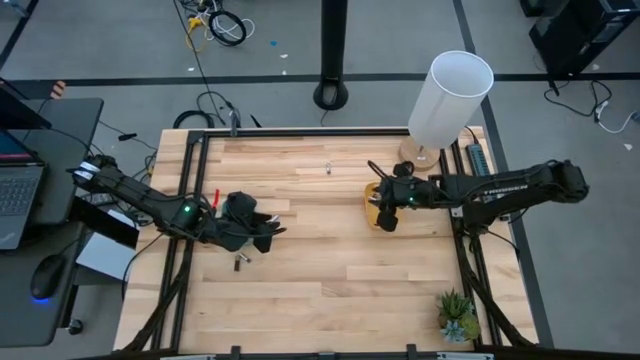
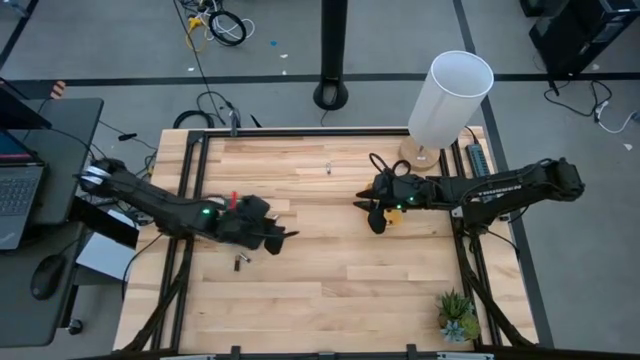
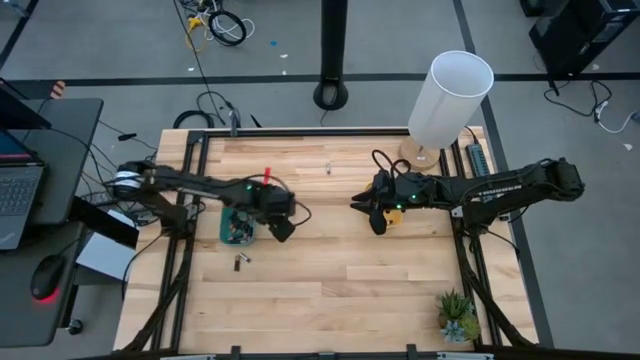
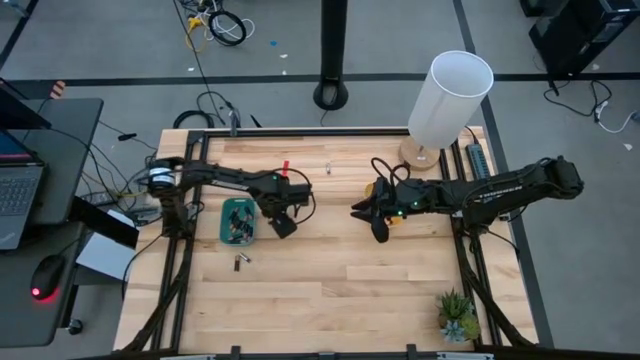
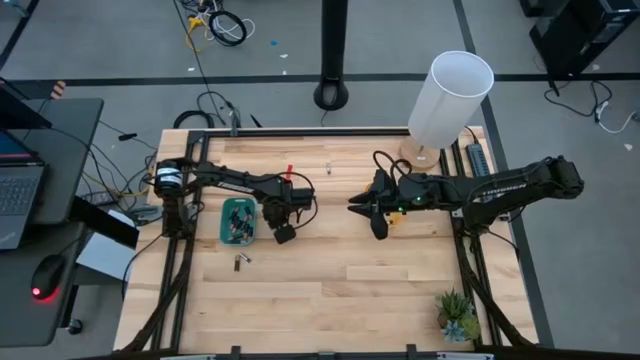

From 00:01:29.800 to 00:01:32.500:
Task: Sort batteries
Put the silver battery into the yellow bin

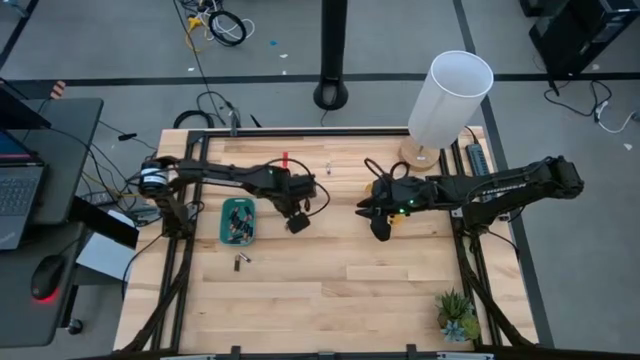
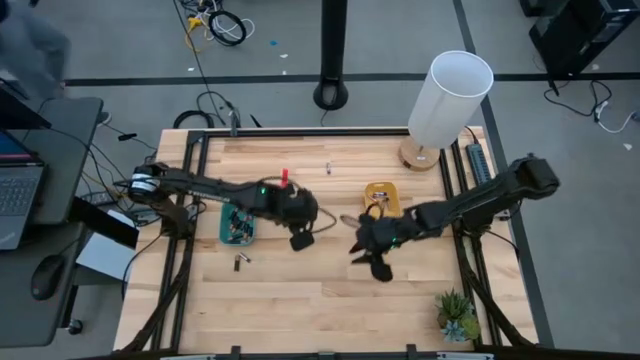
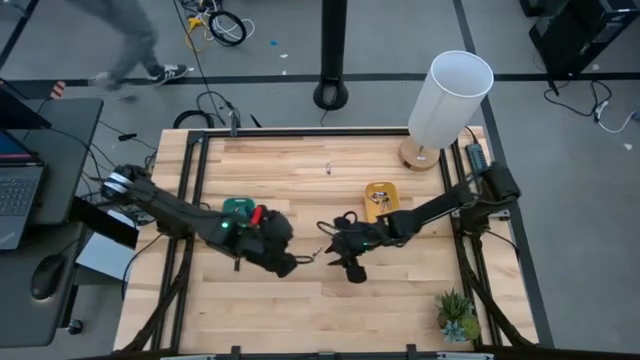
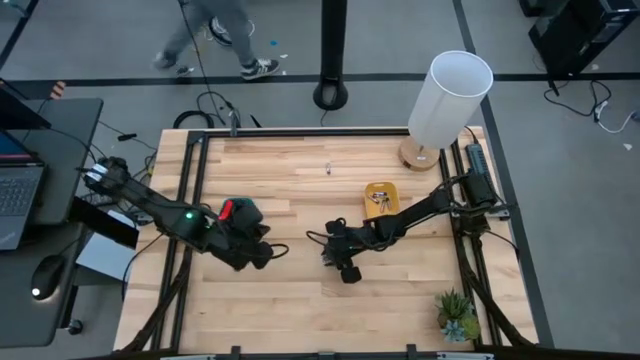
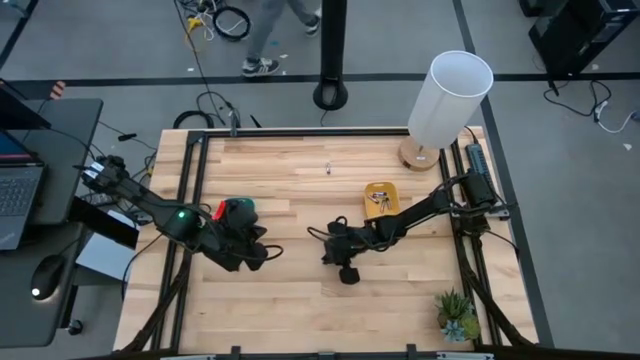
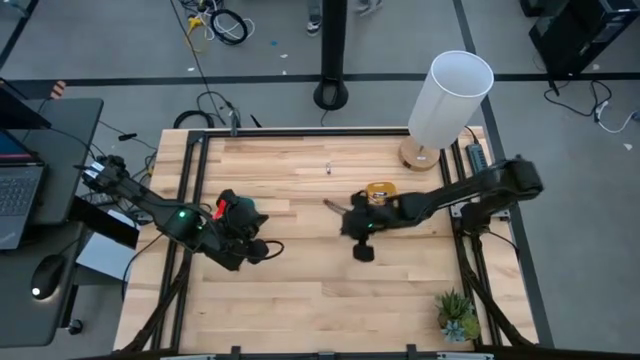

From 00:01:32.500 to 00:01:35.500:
Put the silver battery into the yellow bin

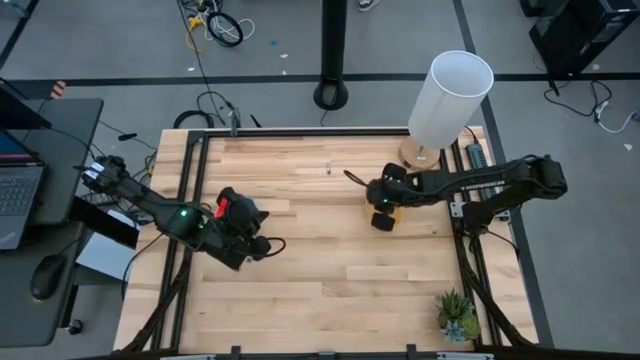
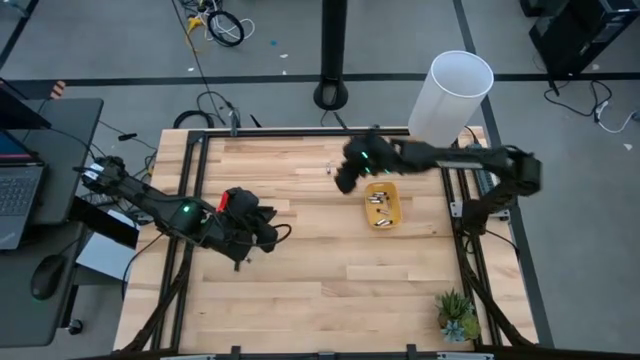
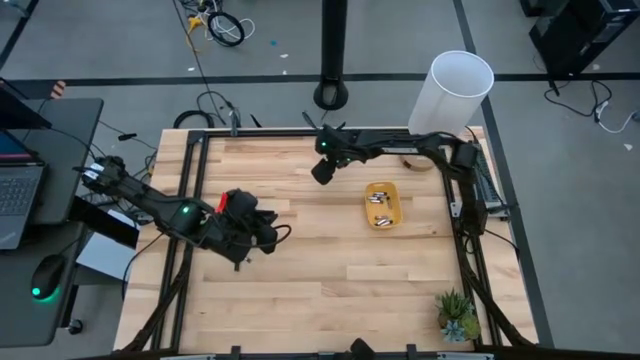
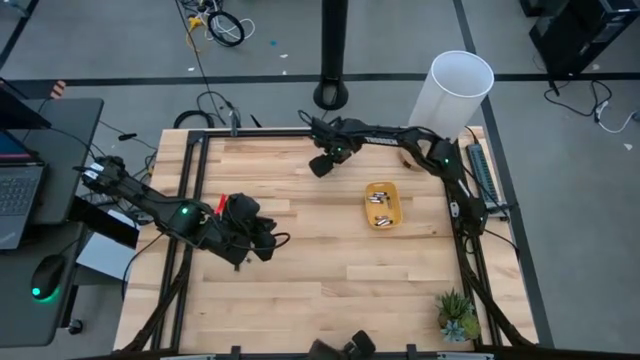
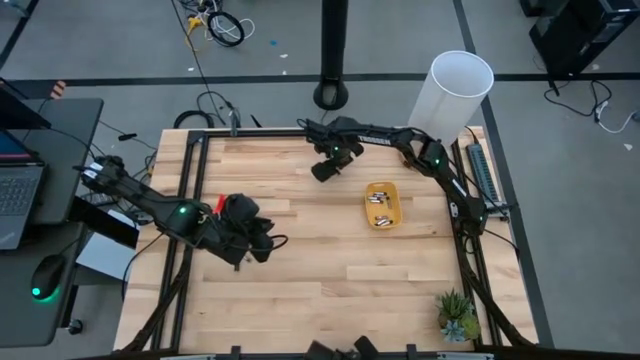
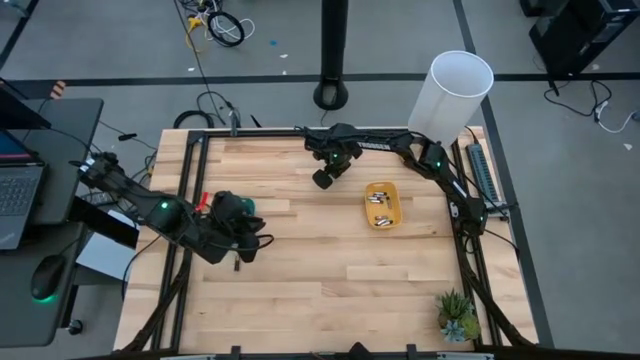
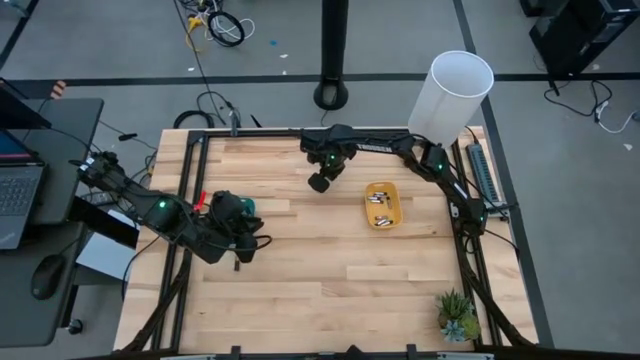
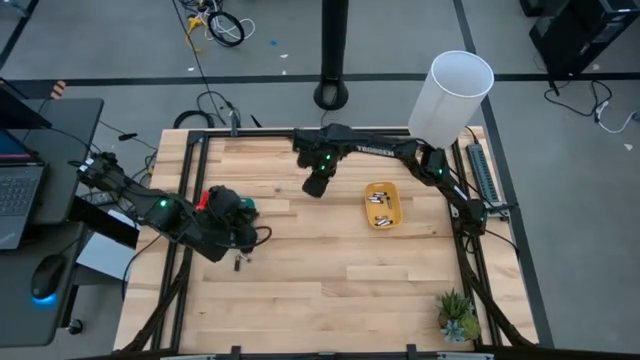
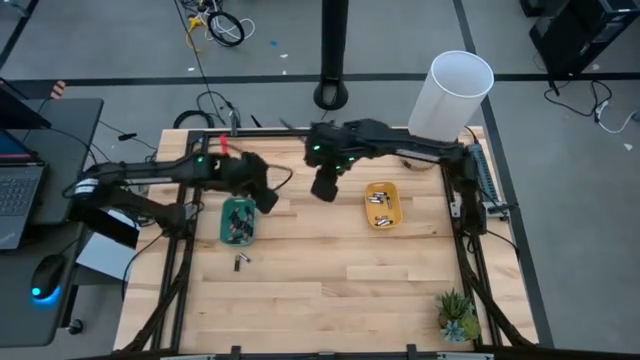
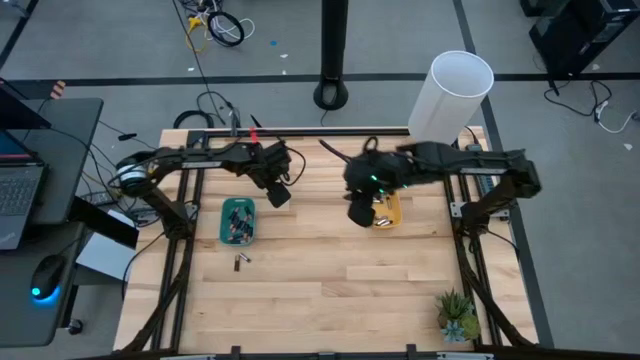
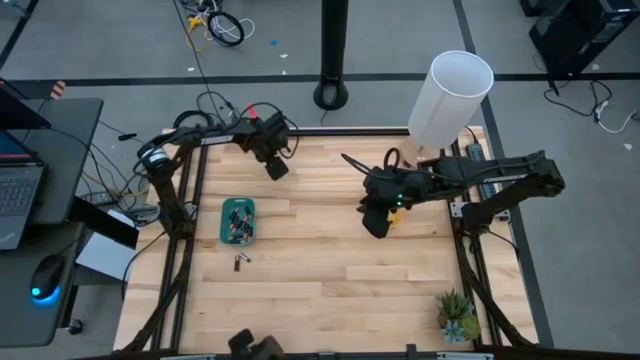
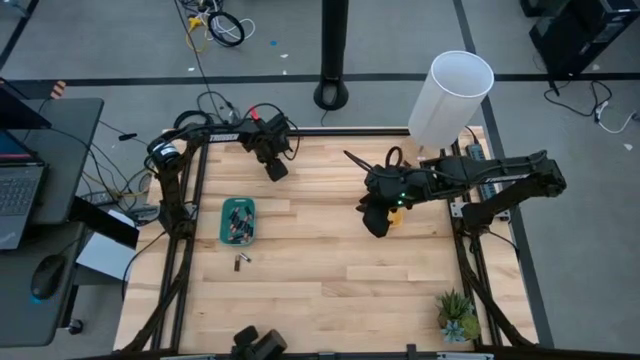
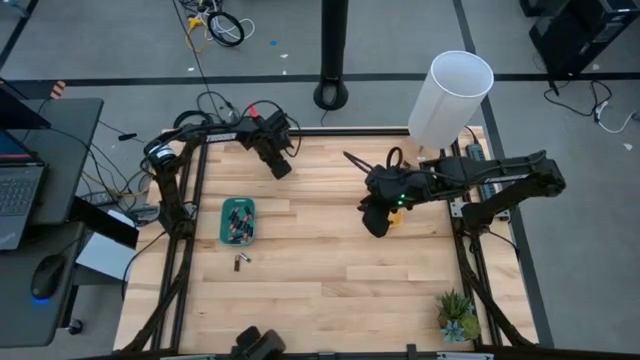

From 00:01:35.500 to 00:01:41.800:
Put the silver battery into the yellow bin

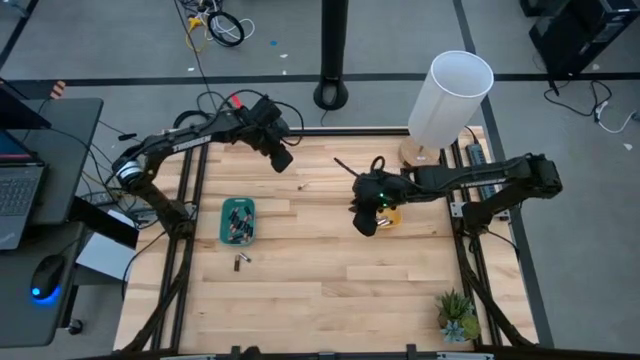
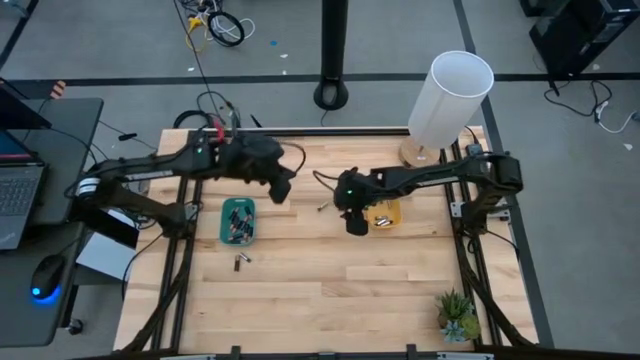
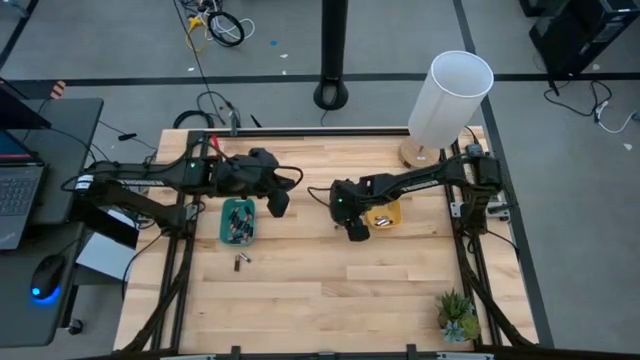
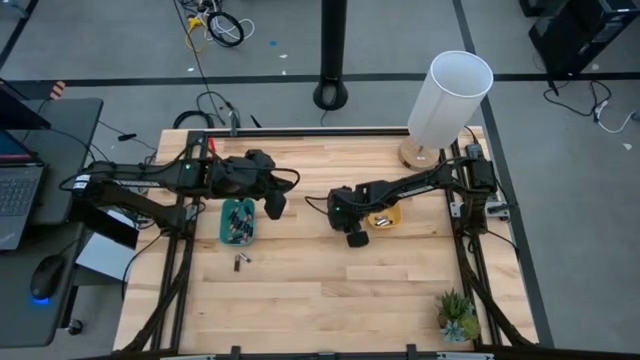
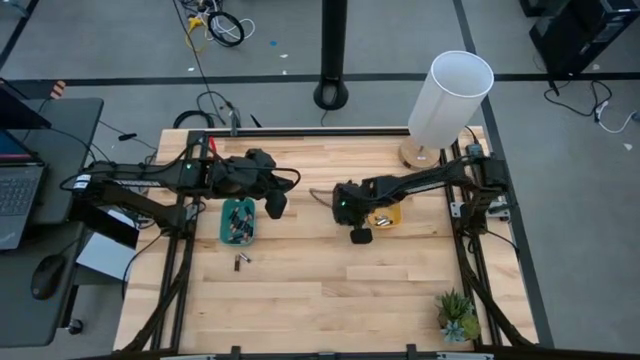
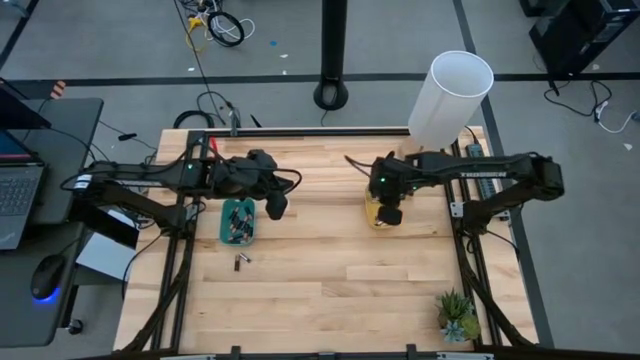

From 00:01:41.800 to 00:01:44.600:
Put the silver battery into the yellow bin

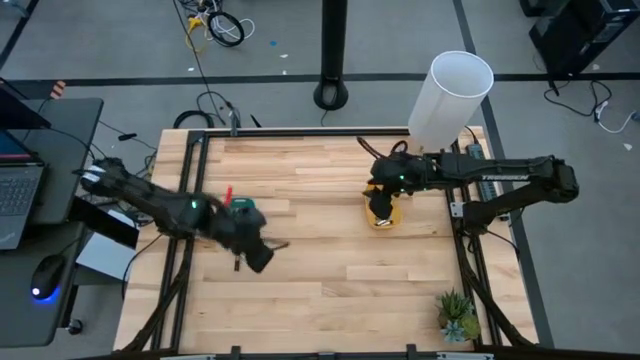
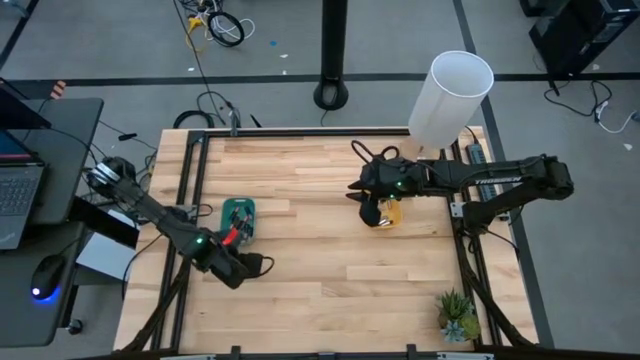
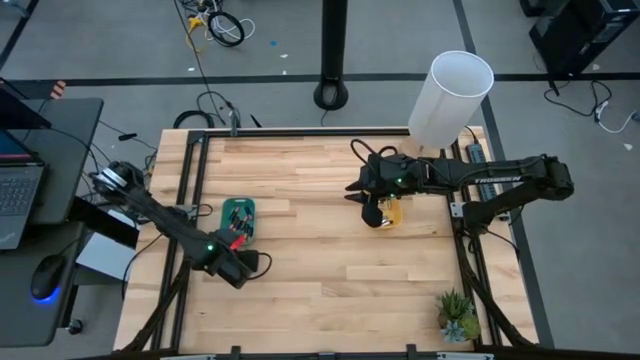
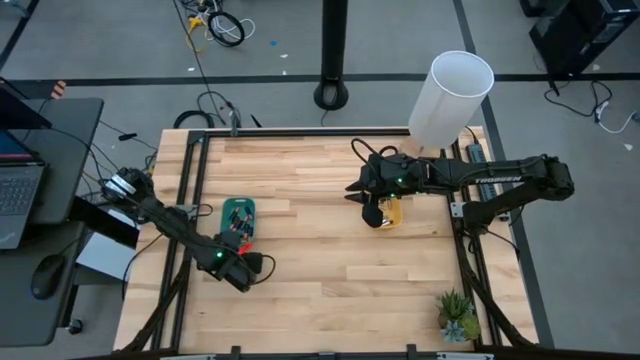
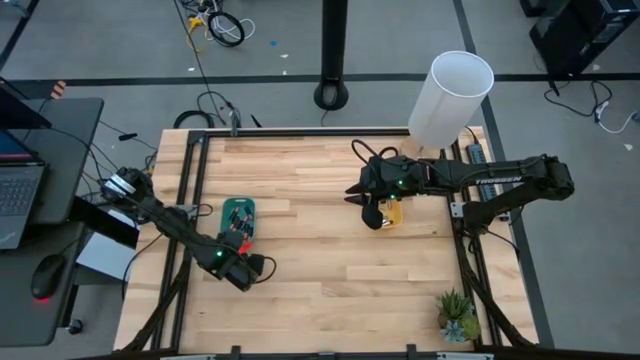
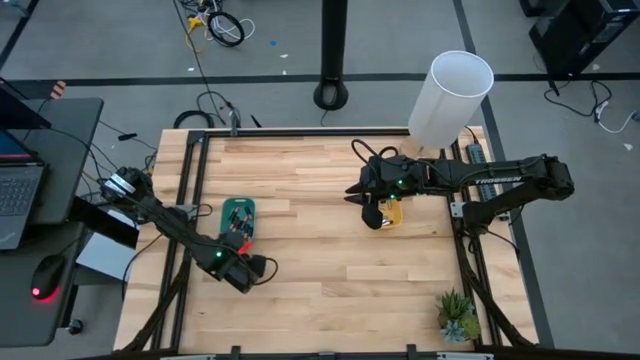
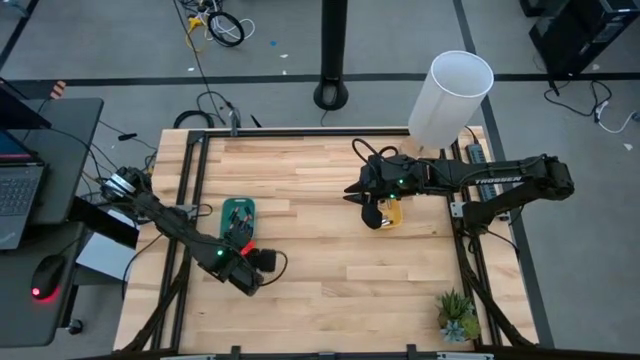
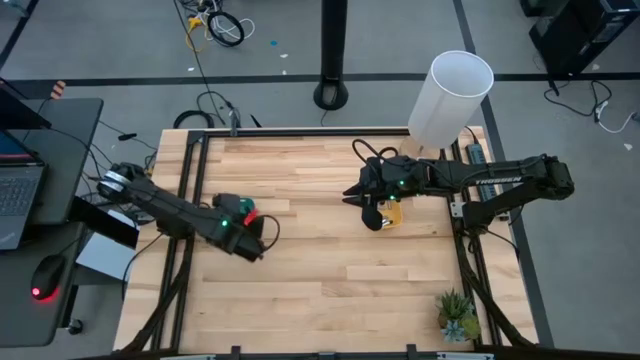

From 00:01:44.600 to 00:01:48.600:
Put the black battery into the green bin

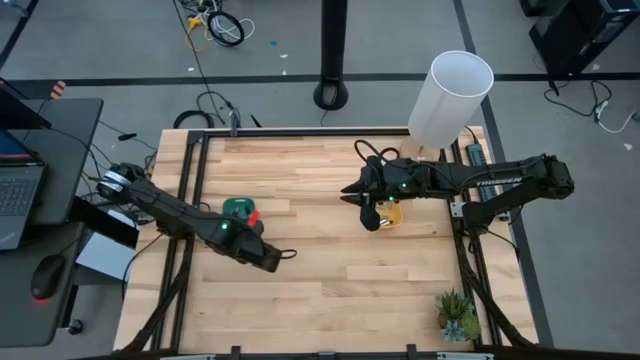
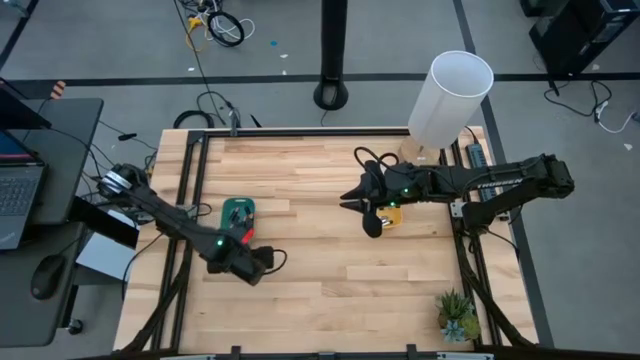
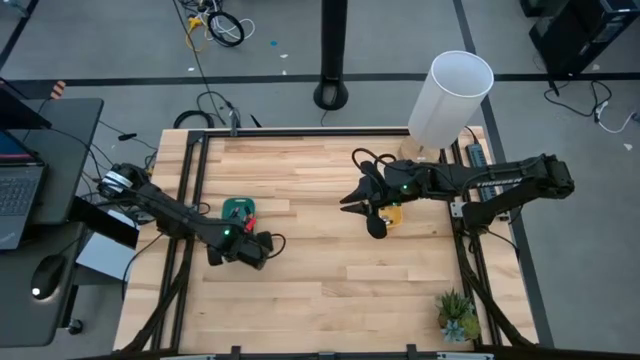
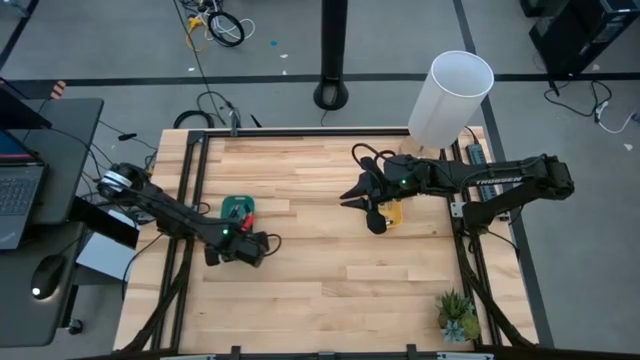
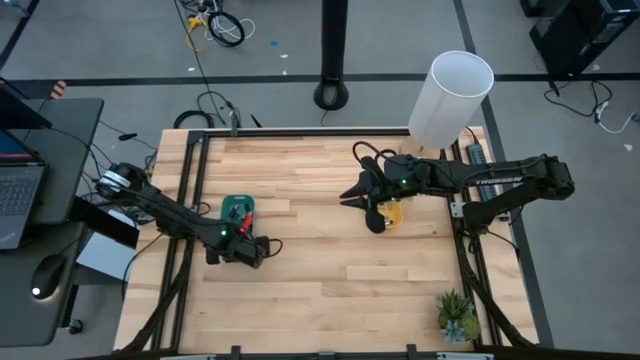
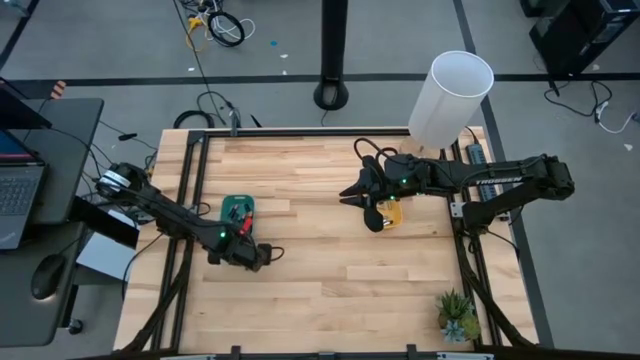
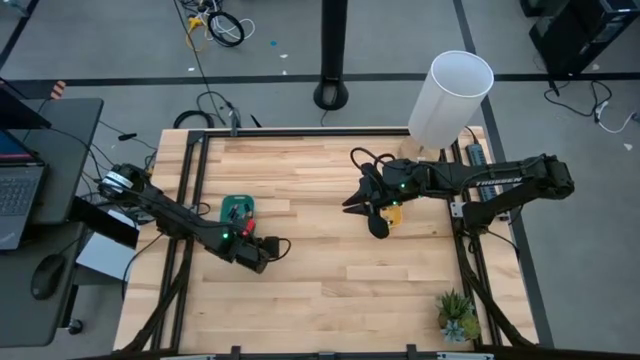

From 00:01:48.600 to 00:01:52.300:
Put the silver battery into the yellow bin
